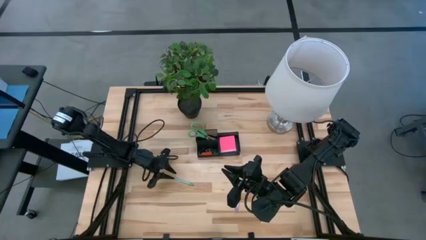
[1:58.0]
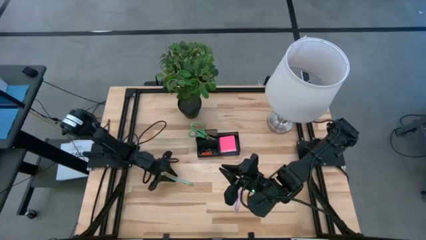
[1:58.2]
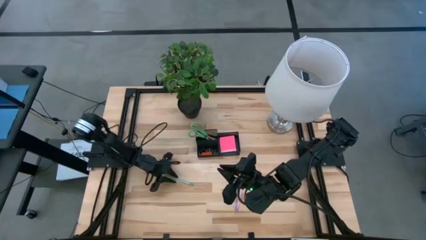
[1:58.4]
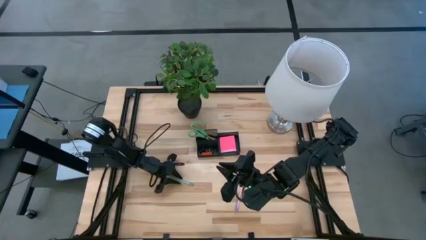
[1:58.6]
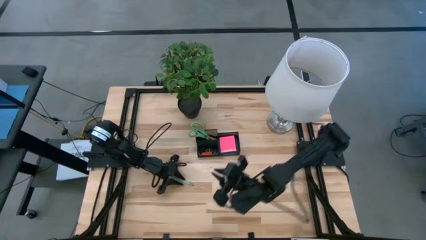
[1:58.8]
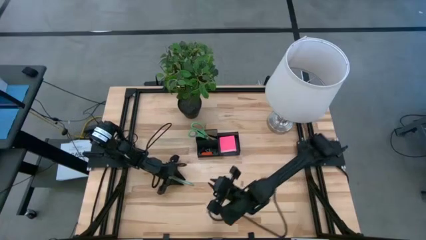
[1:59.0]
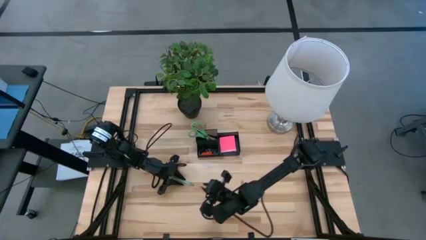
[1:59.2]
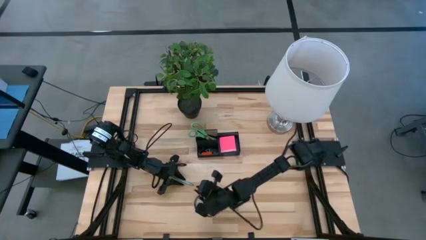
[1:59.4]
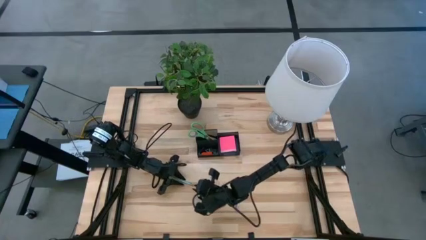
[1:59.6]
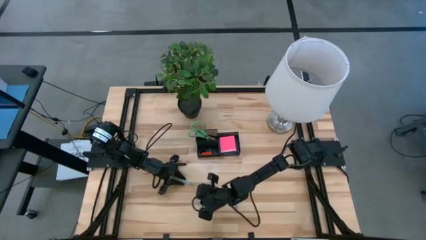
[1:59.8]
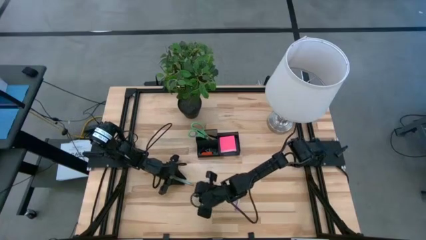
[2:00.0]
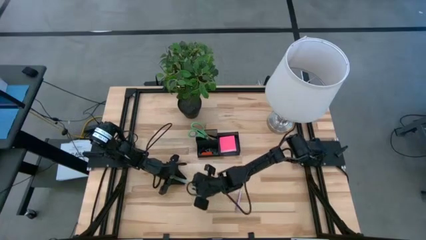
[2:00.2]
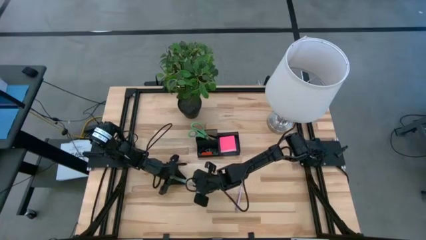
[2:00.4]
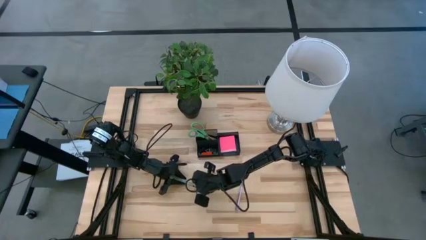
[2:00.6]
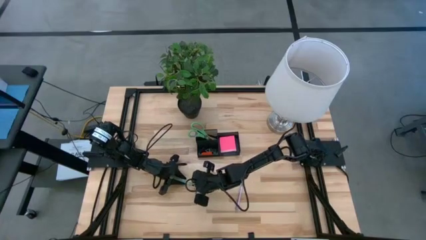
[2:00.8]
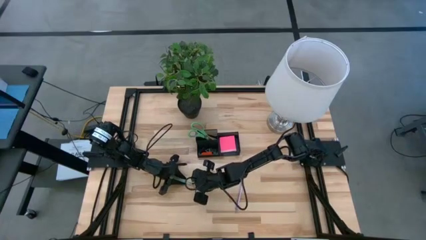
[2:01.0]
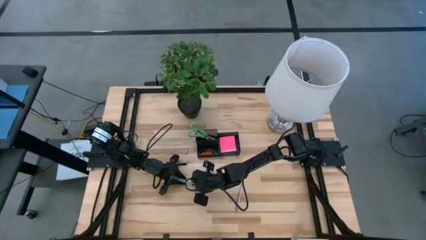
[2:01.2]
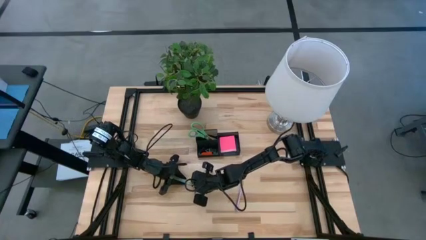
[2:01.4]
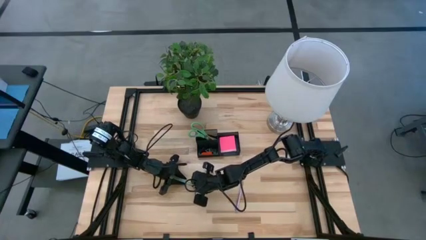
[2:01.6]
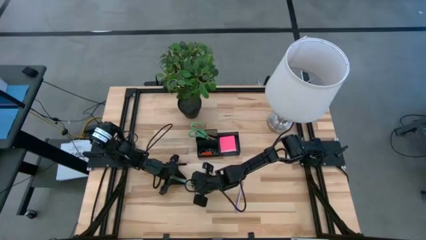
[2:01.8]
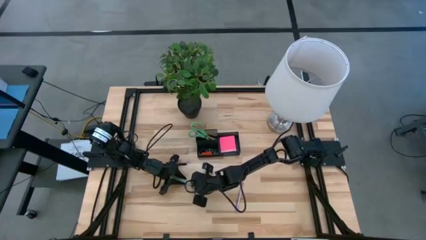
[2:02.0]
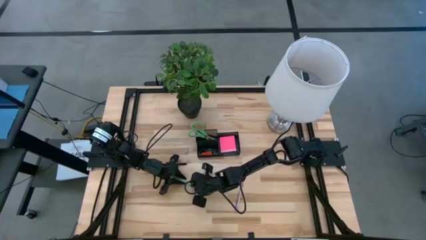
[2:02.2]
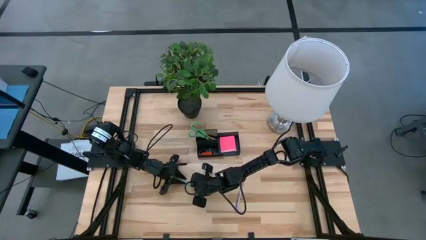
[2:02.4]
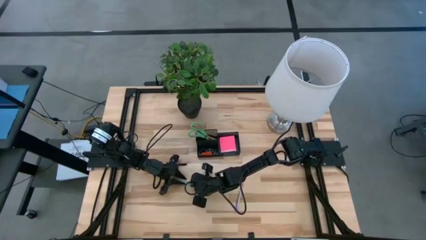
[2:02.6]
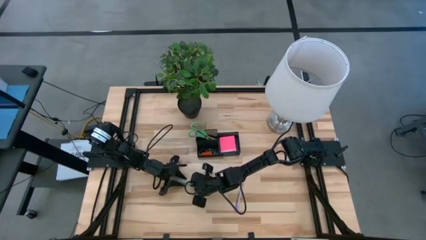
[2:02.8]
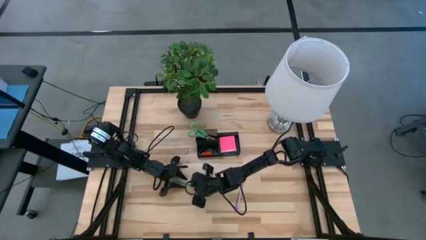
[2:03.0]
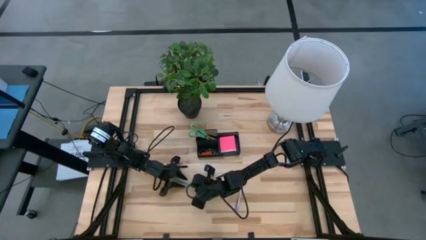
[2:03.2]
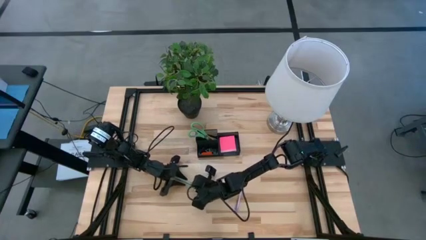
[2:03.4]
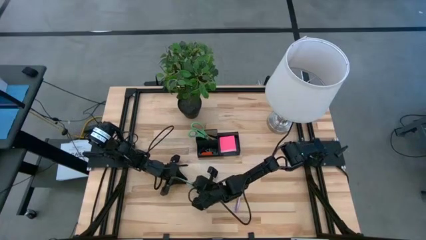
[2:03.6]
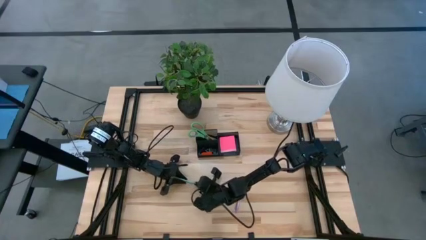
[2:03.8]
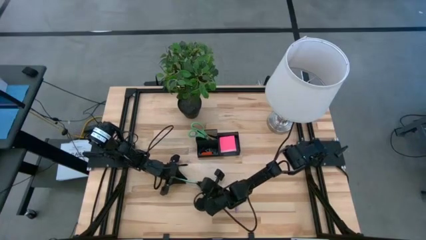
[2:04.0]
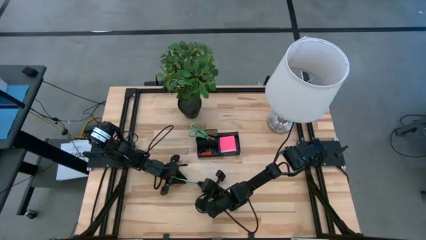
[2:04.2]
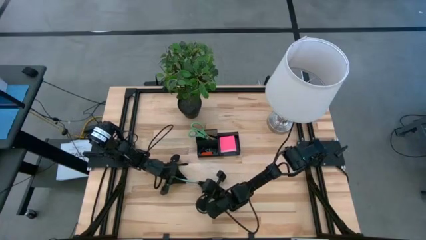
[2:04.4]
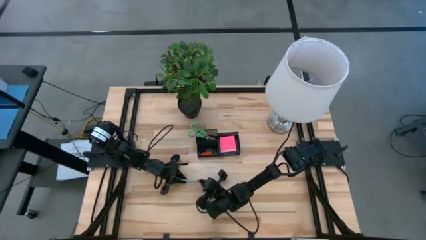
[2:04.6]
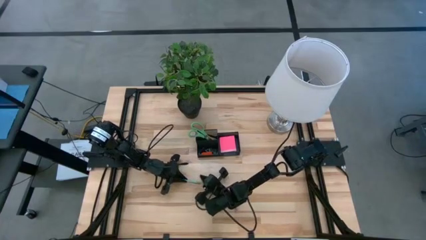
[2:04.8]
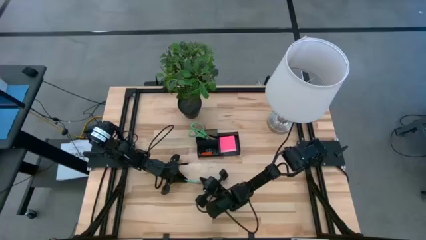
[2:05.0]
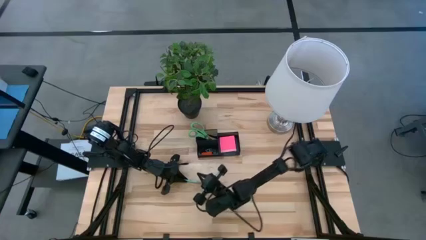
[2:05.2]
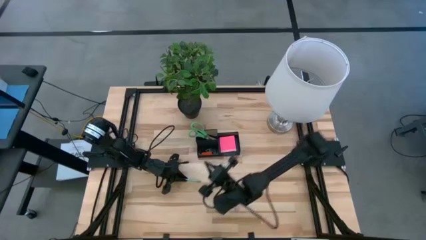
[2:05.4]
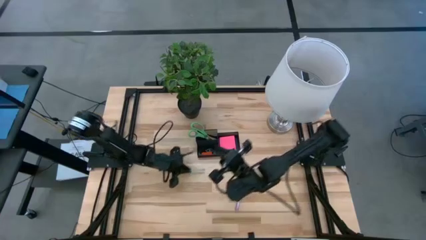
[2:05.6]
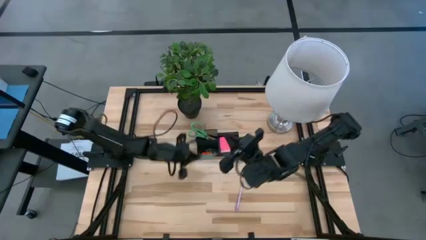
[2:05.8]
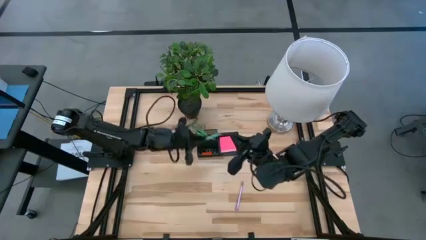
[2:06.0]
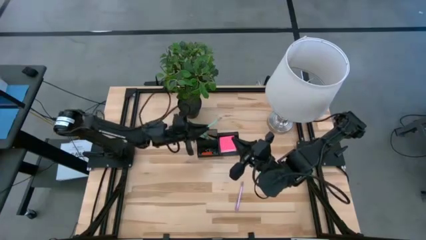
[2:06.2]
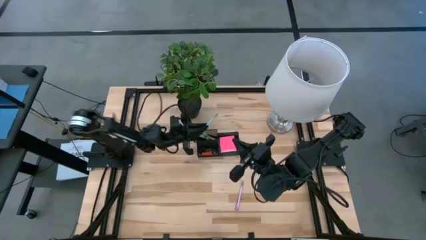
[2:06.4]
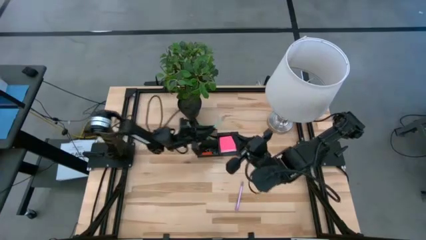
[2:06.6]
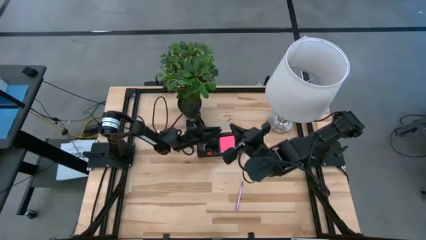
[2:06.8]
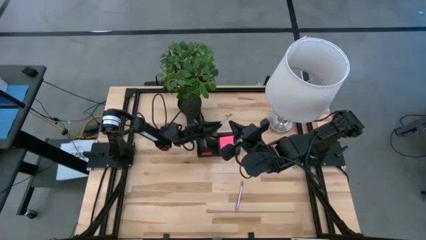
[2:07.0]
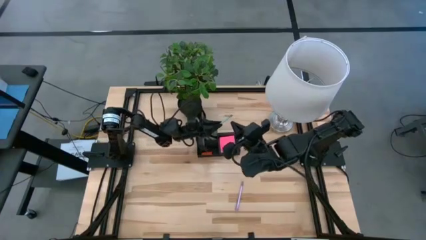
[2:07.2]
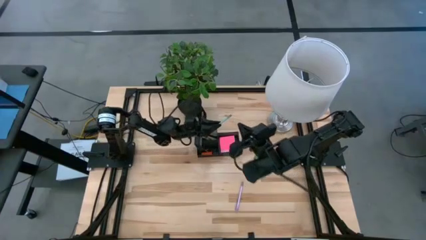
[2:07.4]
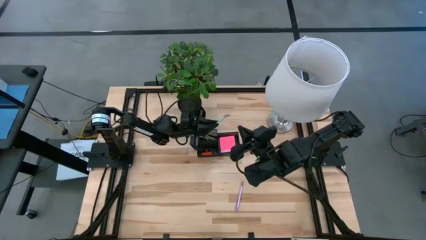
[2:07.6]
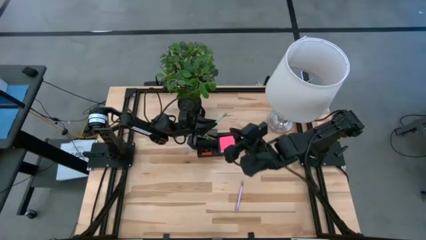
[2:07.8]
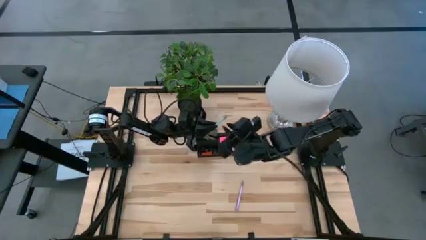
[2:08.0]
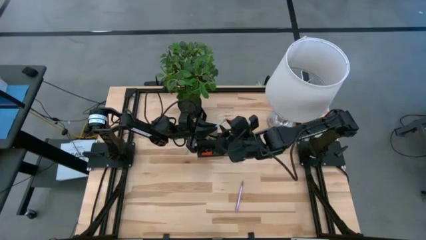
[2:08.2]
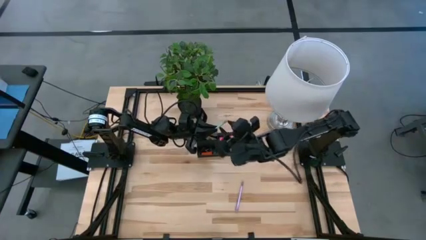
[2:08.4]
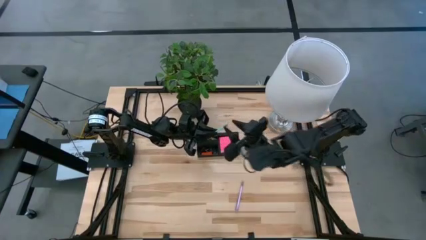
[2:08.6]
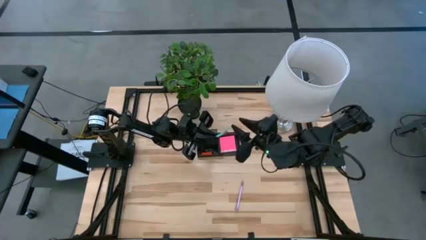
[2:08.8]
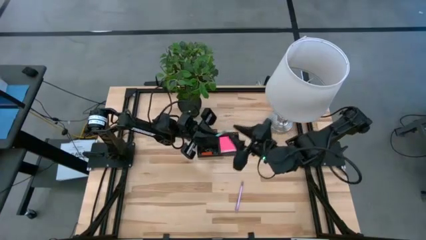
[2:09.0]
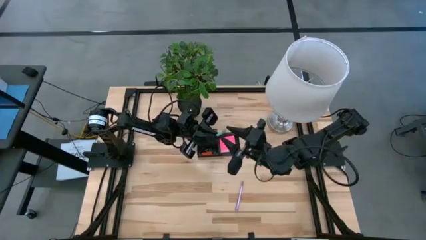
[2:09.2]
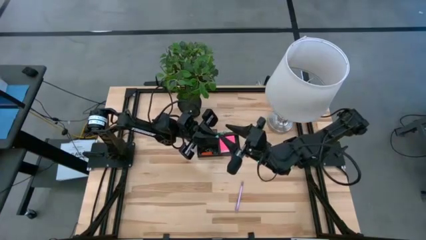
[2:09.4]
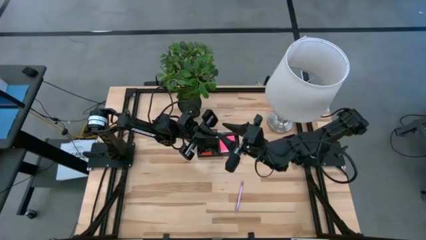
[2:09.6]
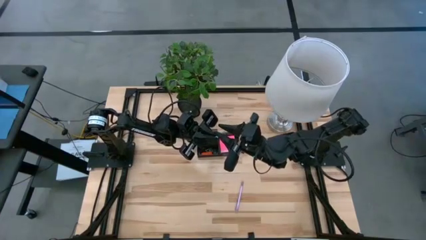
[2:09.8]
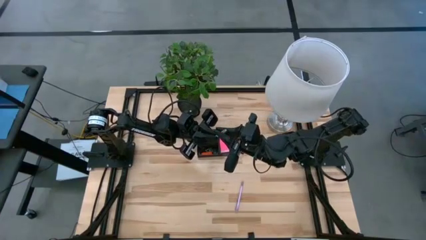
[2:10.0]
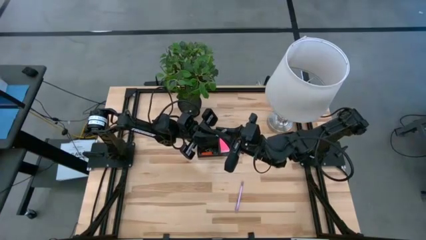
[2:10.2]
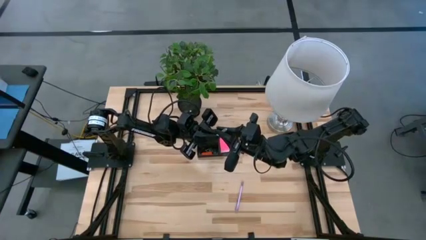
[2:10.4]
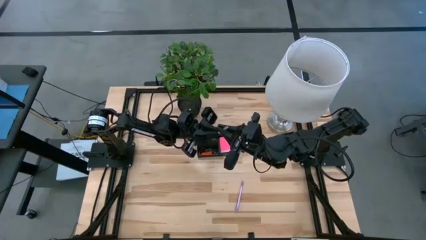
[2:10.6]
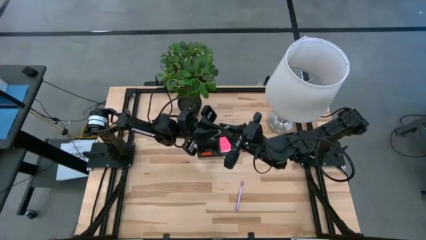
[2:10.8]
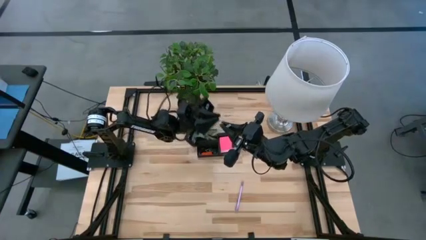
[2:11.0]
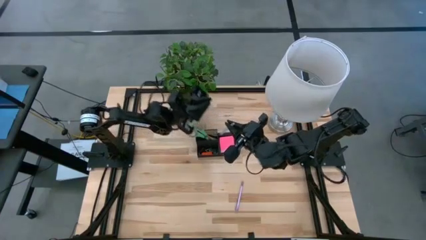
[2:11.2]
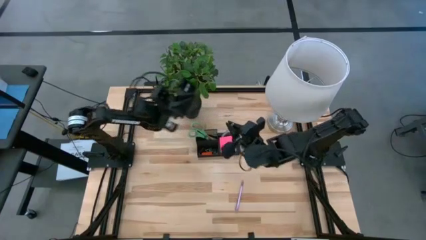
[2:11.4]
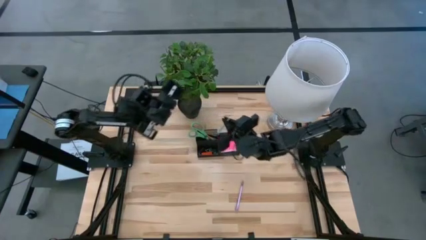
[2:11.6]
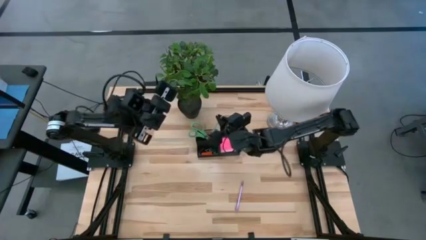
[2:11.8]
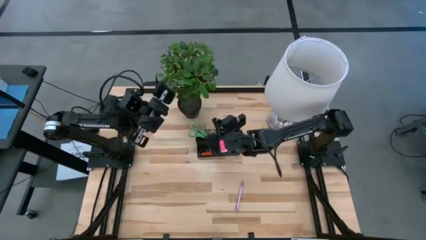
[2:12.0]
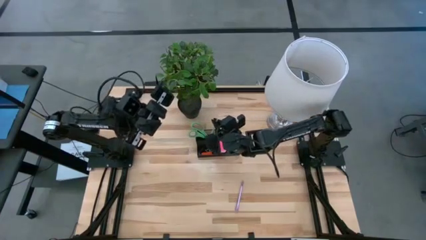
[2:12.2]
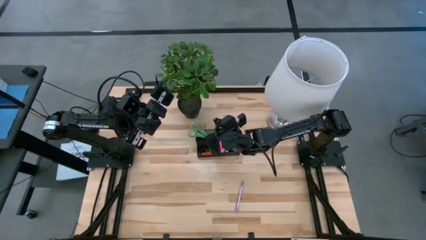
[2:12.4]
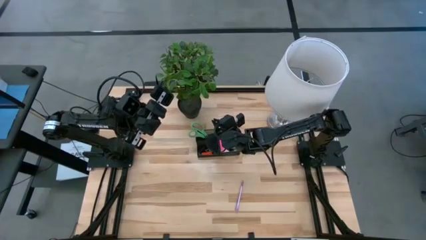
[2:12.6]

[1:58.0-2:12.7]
Task: Pick and place office supplies into organizer
Put the blue pencil into the black desk organizer
